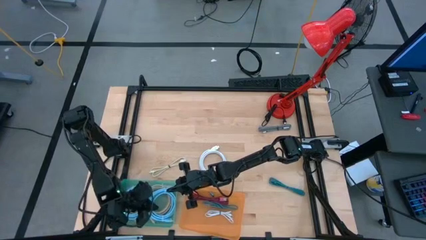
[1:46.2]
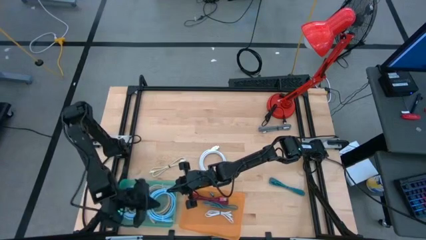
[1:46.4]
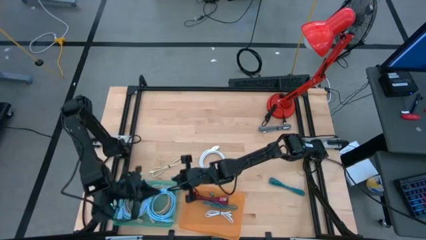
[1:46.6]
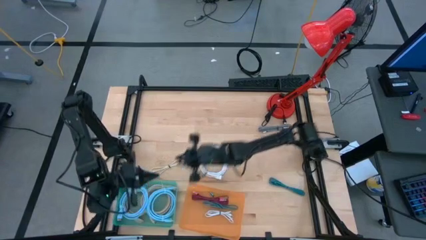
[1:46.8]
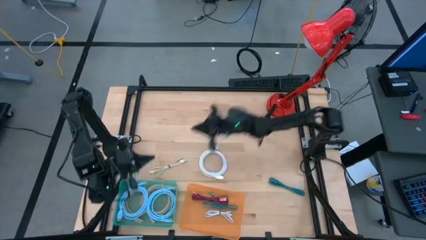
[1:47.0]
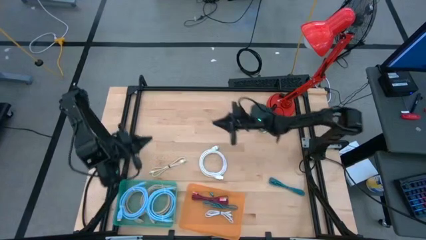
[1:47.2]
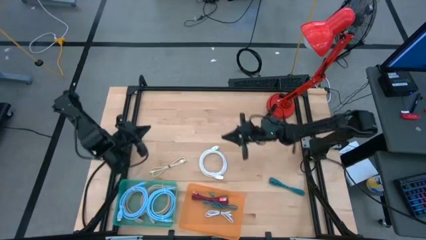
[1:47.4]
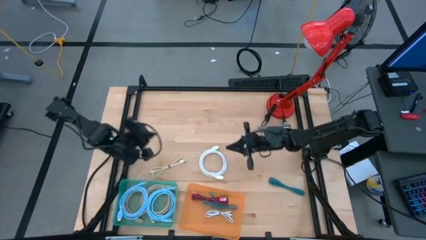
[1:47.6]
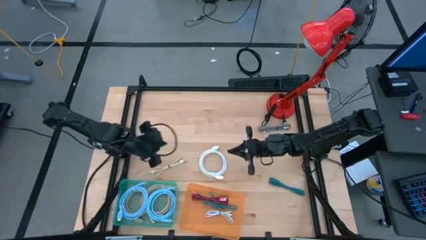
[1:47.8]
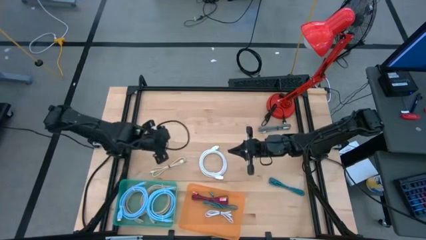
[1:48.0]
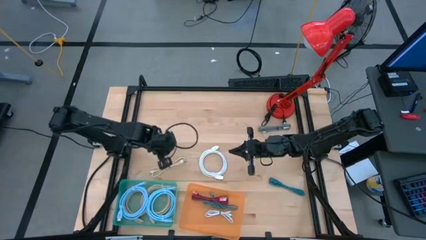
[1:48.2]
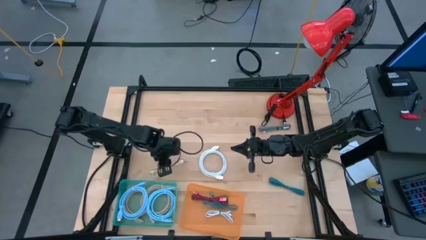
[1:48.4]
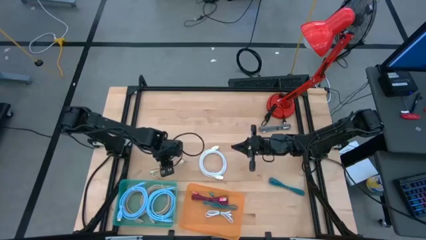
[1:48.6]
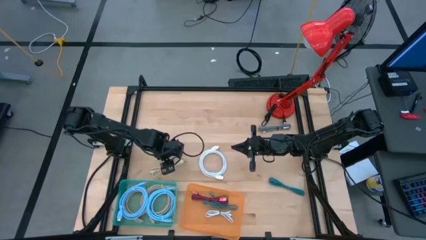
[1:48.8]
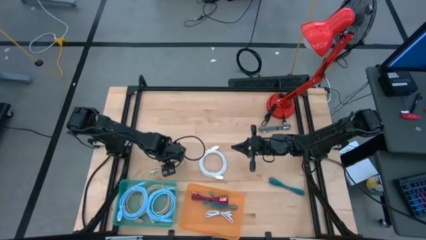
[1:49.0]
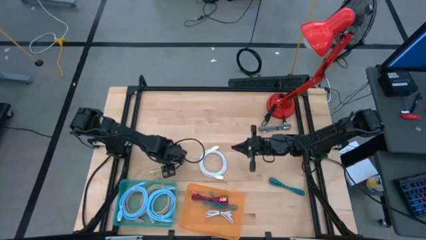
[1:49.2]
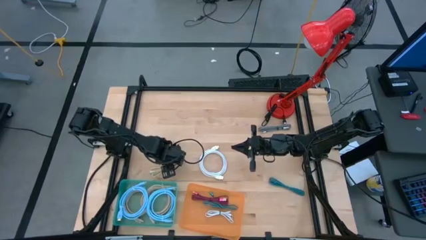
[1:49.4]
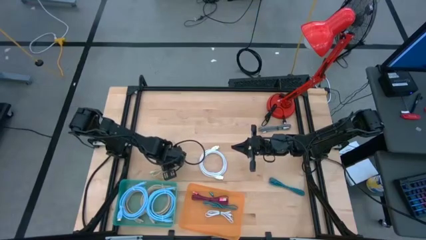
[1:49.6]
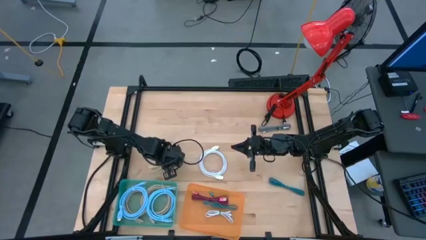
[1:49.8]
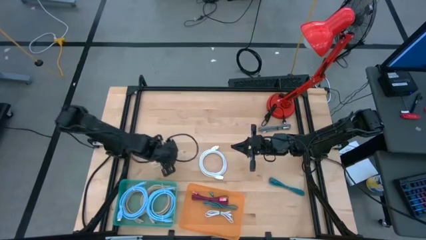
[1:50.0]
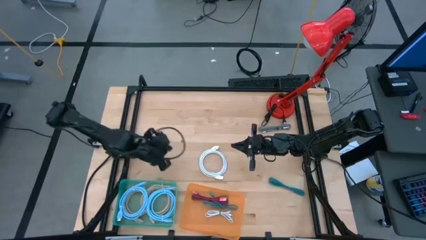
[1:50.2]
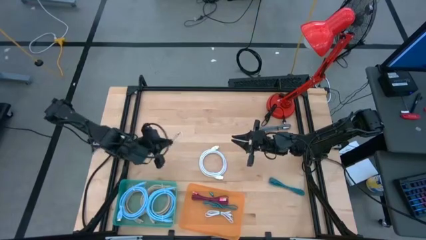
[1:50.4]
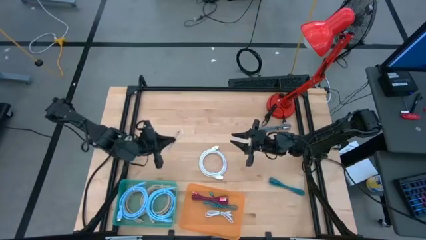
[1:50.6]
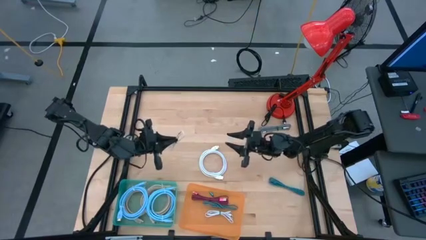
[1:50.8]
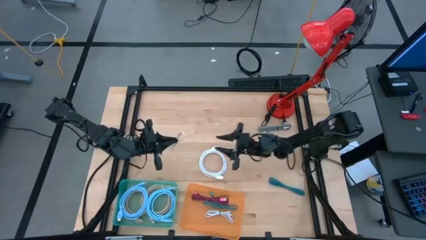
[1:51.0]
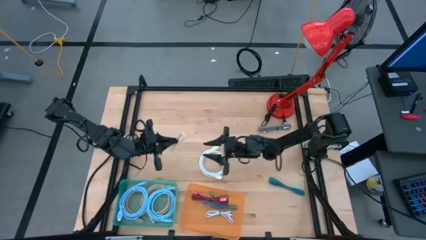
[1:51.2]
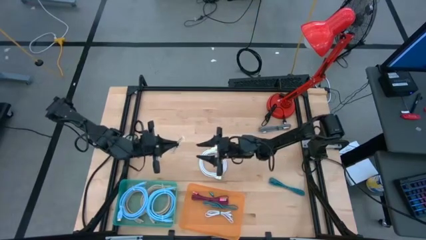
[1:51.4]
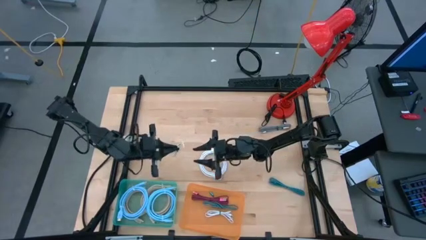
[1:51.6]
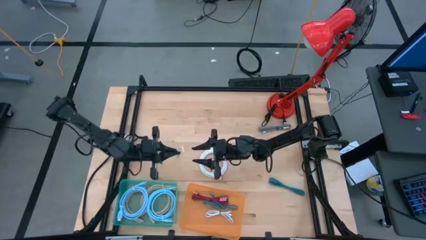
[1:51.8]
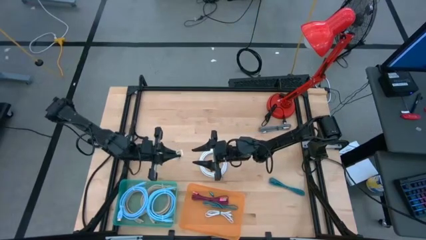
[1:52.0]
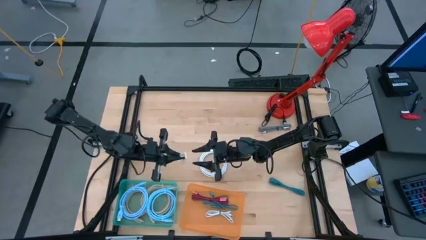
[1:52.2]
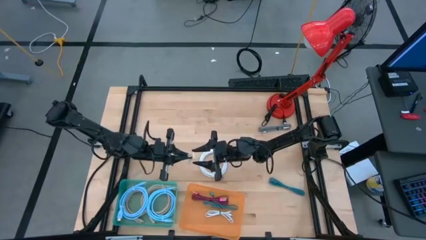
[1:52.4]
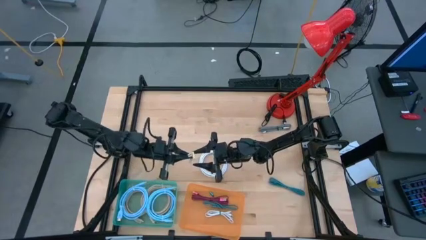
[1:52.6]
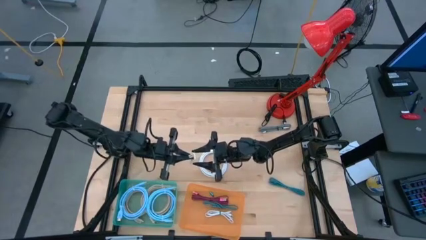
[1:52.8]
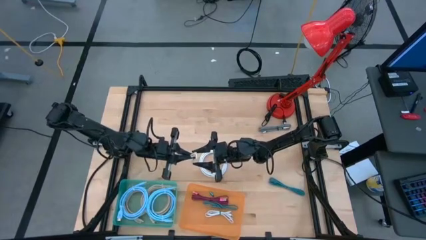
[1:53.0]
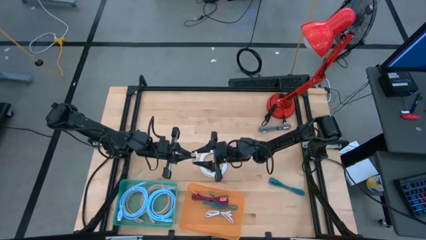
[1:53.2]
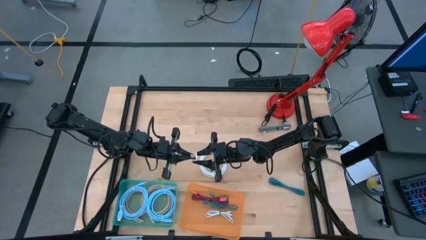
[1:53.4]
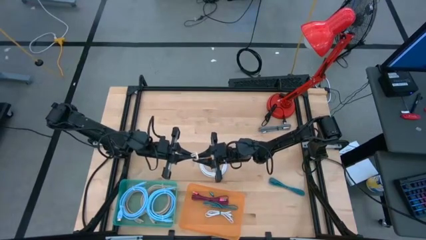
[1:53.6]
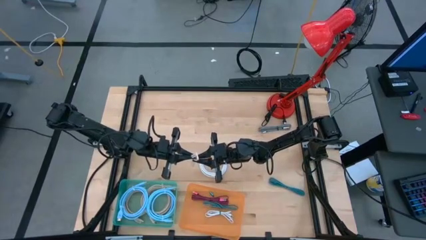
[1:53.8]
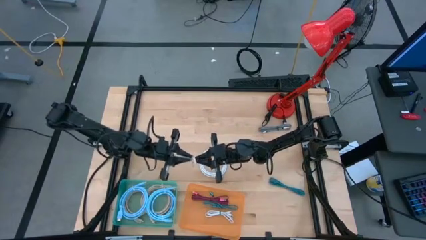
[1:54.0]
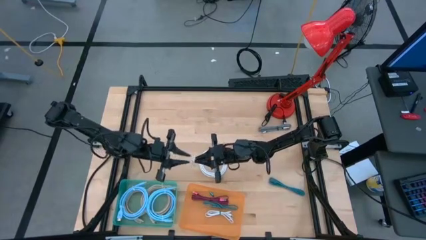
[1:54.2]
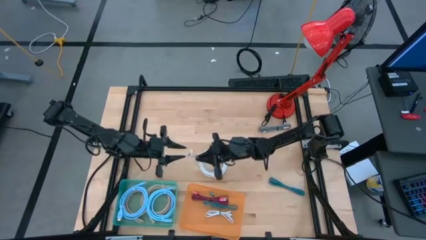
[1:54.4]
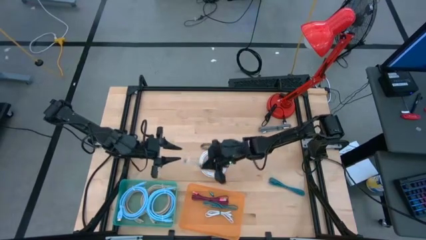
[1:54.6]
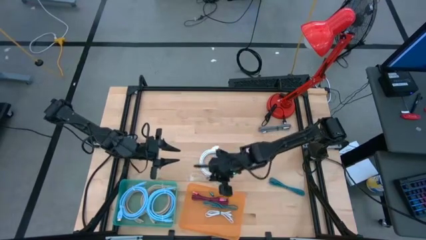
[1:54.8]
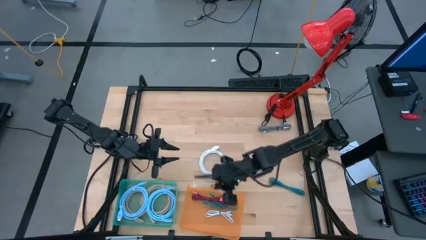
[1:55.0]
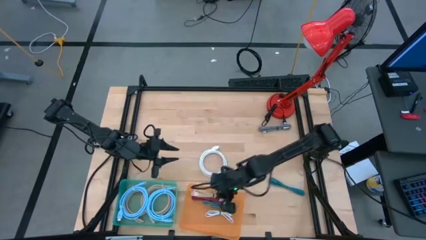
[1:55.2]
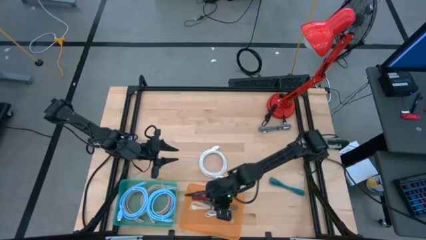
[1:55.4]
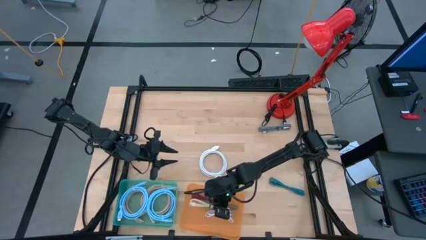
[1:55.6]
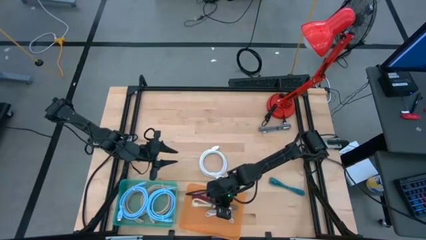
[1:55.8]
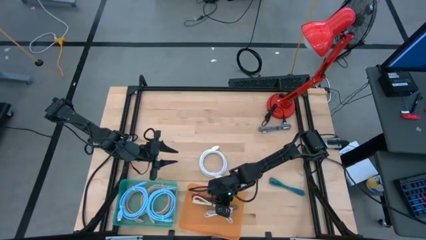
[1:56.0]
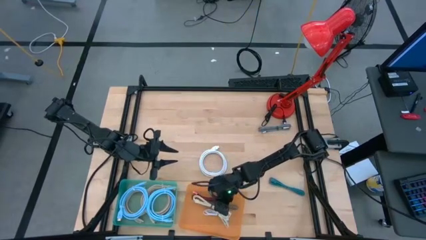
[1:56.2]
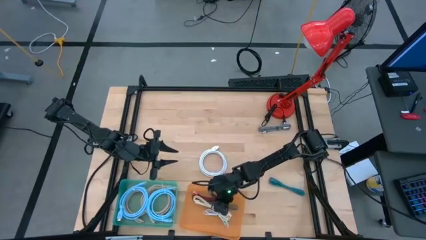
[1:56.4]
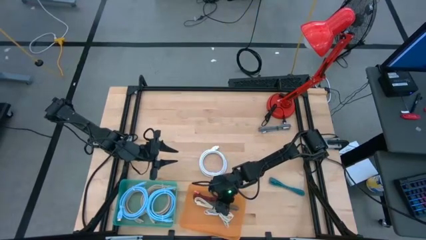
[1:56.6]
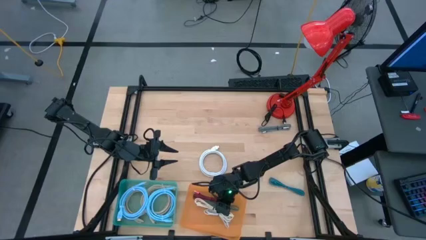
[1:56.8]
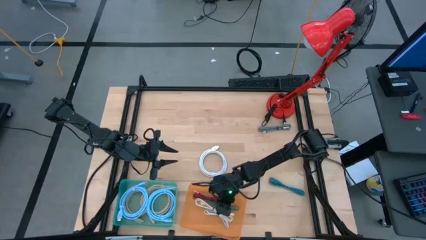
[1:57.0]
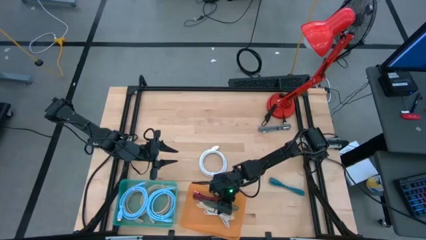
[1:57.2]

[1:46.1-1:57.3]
Task: Pick & Place USB Port
Put the brown charger cable into the orange bin

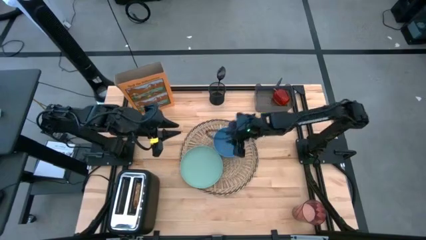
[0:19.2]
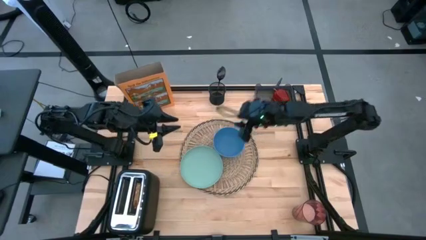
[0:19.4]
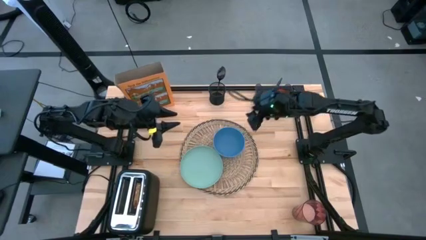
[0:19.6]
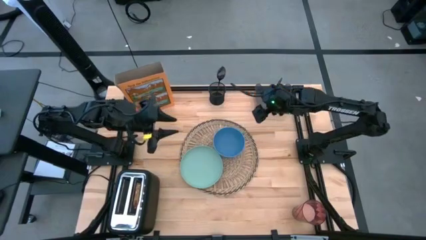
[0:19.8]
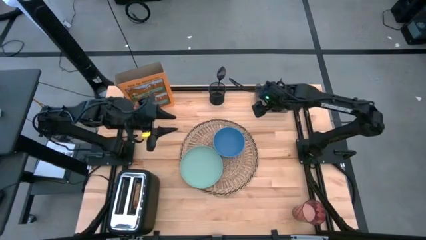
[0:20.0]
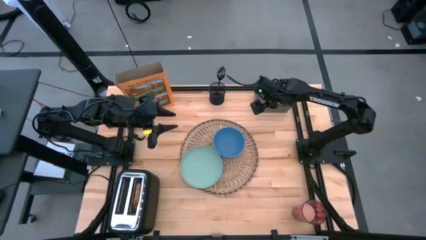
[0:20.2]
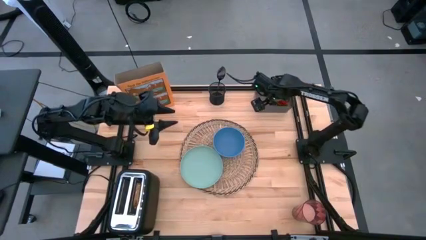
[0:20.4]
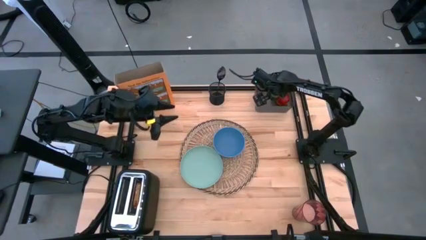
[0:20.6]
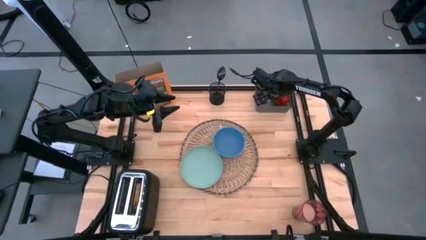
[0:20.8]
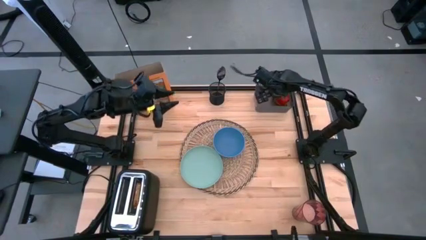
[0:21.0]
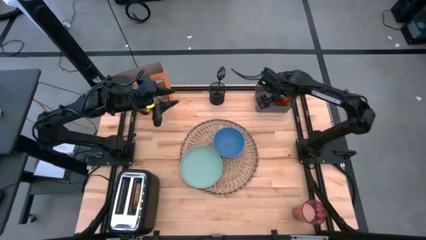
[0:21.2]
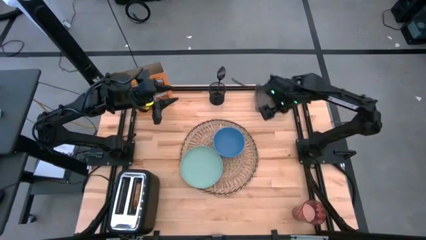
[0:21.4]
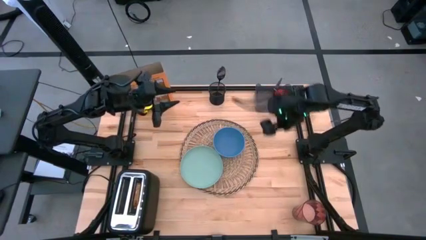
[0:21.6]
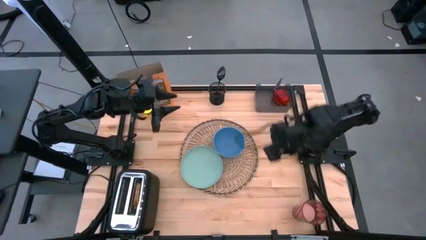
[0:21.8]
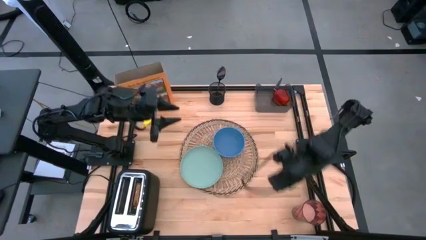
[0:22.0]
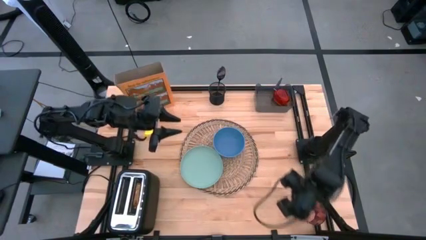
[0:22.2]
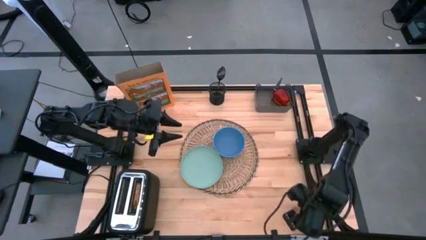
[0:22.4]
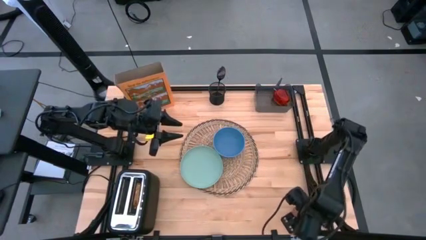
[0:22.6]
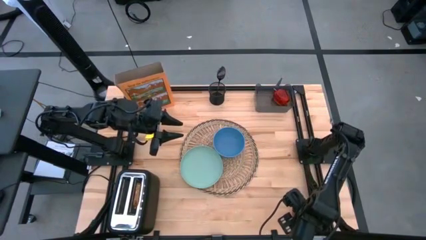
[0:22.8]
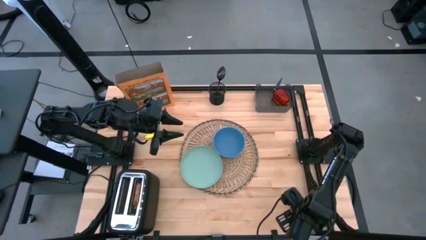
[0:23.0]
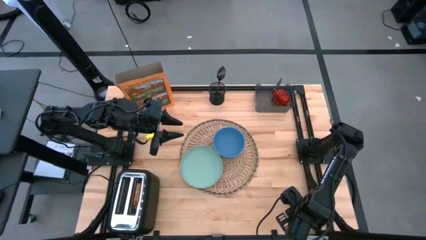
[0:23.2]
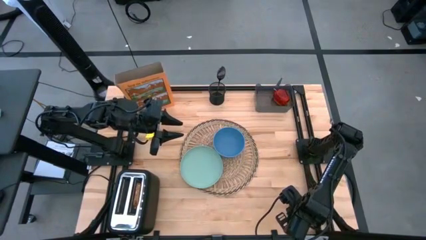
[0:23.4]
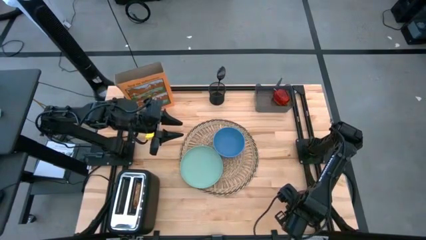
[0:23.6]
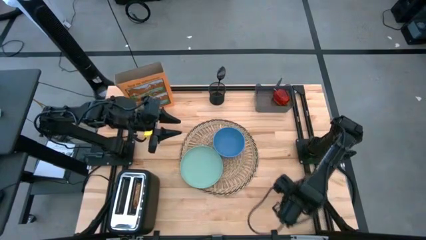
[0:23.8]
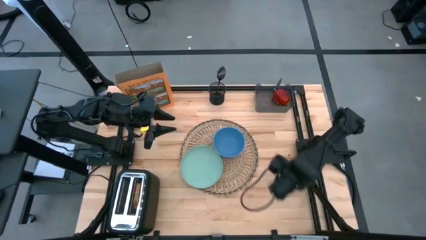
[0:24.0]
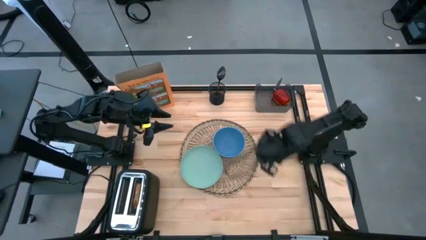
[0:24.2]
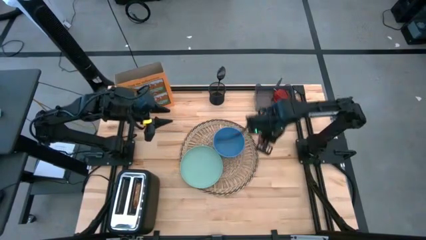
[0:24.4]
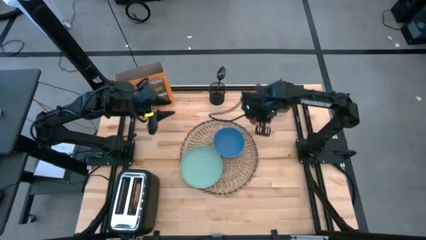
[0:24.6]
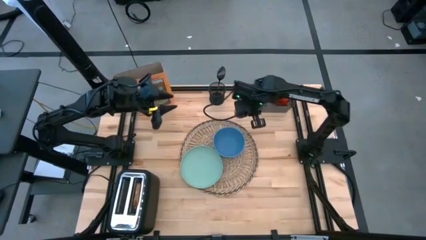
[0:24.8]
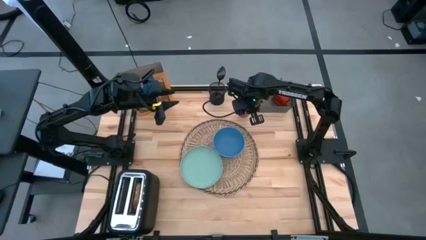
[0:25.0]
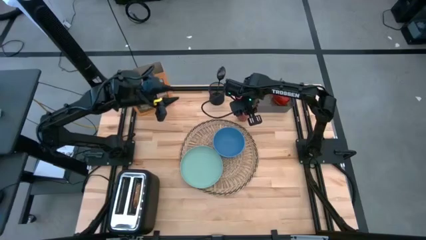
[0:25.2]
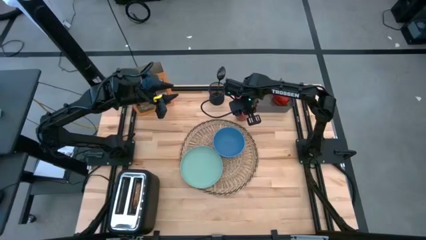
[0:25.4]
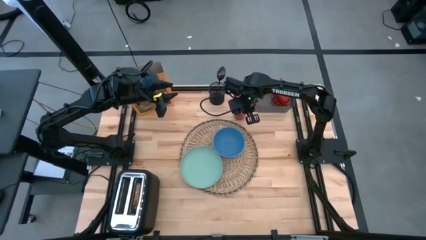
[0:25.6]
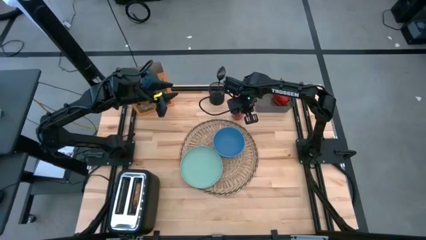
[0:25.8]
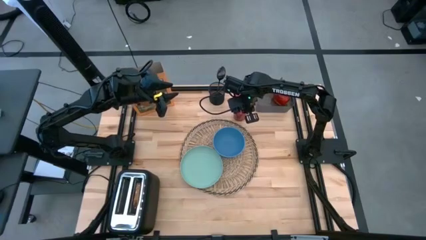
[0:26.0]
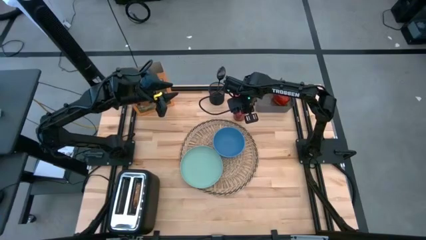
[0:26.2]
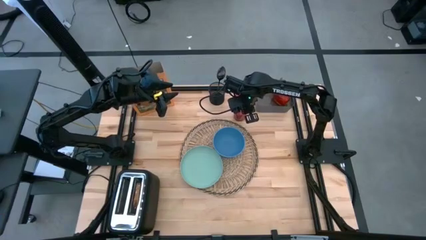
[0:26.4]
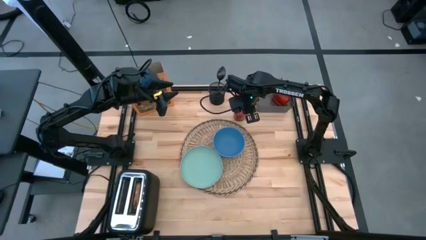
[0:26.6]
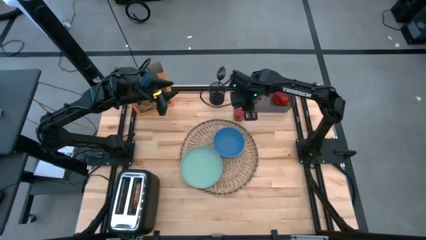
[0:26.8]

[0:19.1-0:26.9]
Task: Arrange a breakfast setting
Put the red glass to the top right of the brown table mat
